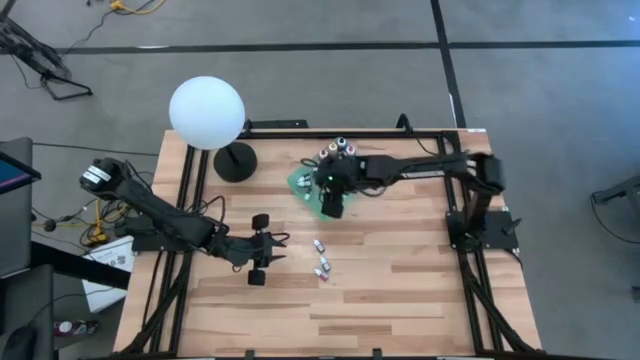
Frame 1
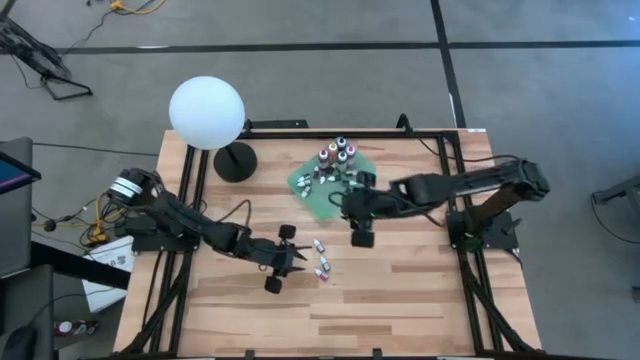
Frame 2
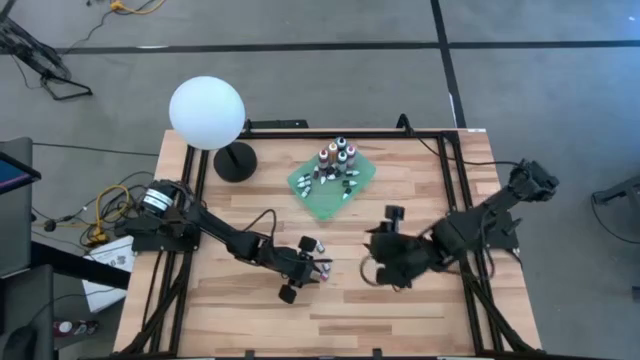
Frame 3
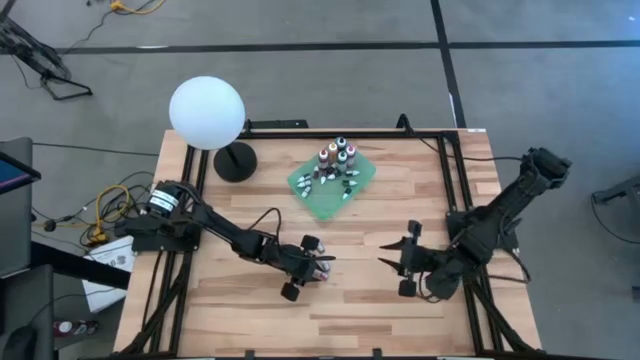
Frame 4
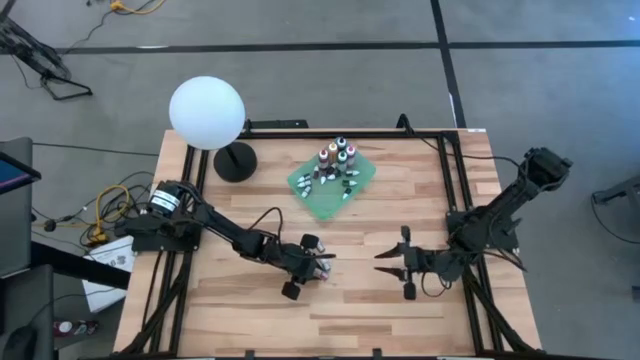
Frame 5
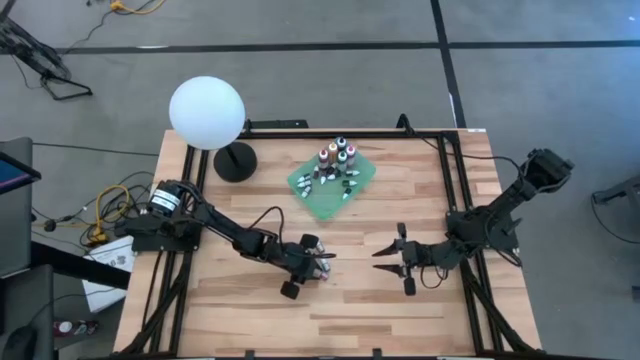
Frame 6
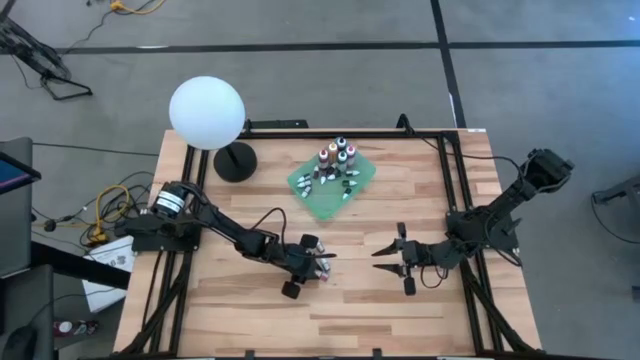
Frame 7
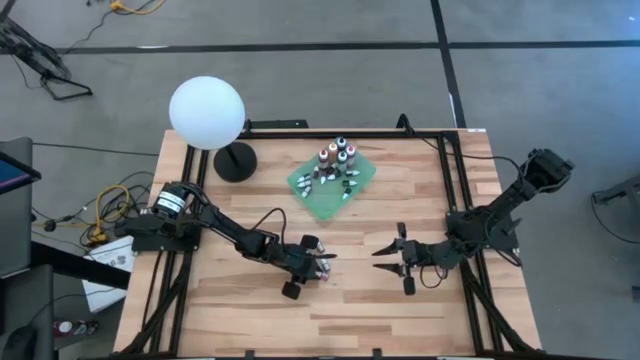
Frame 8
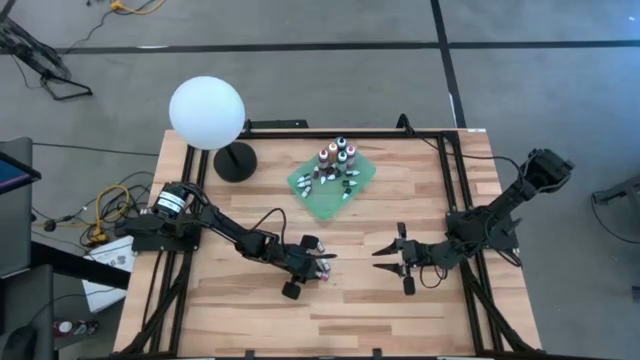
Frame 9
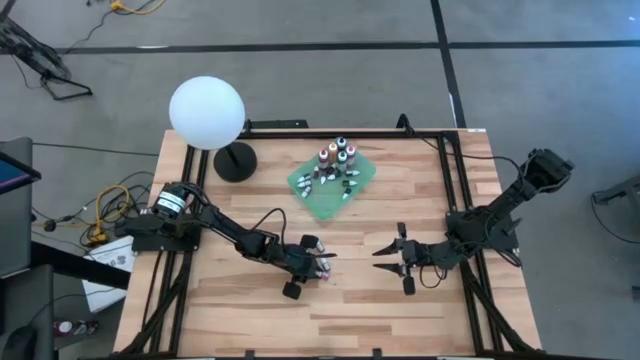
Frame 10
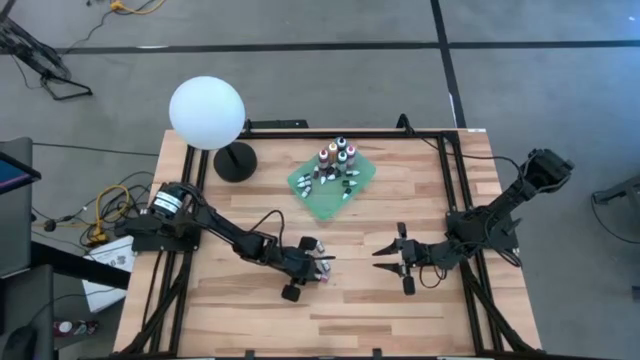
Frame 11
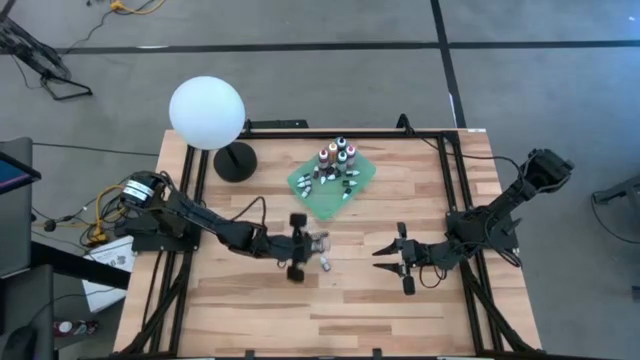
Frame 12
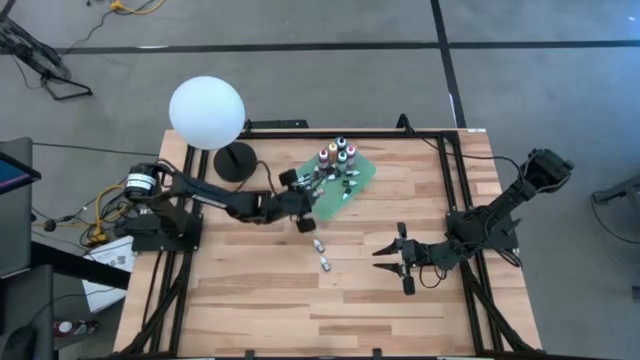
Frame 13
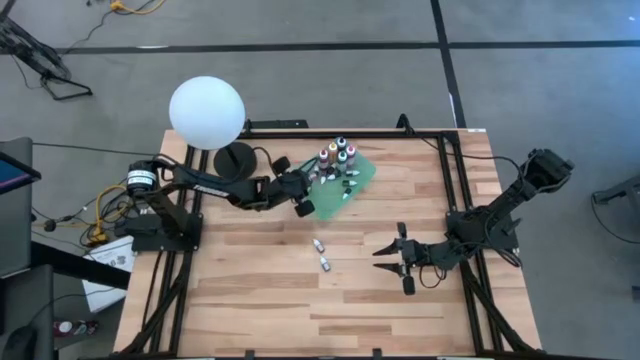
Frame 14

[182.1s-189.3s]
Task: Pick & Place food coloring
Put the pink food coloring bottle into the green bin

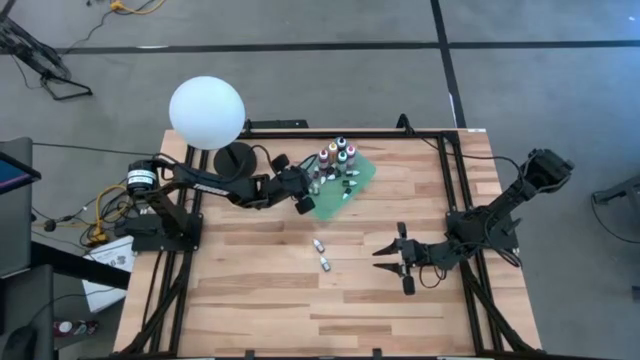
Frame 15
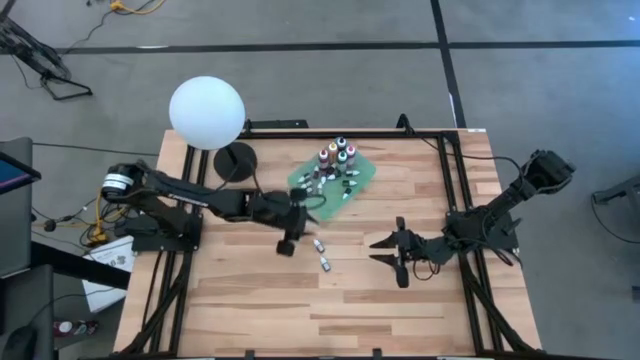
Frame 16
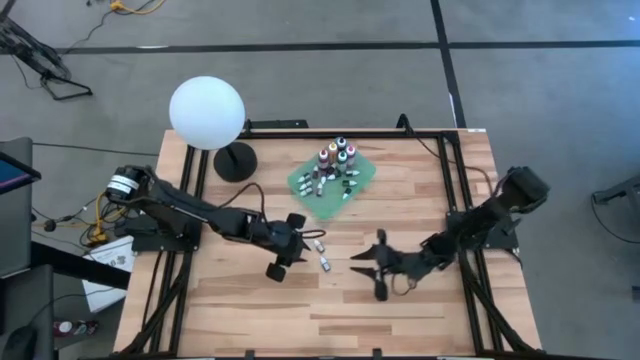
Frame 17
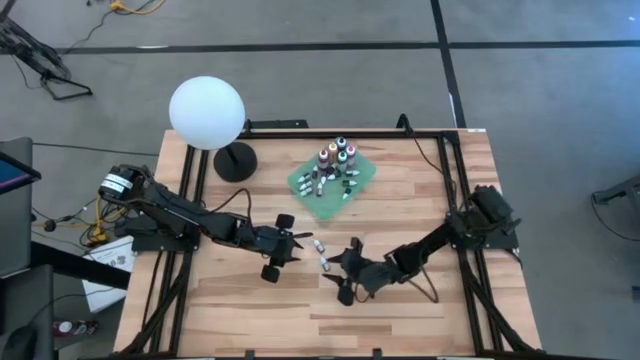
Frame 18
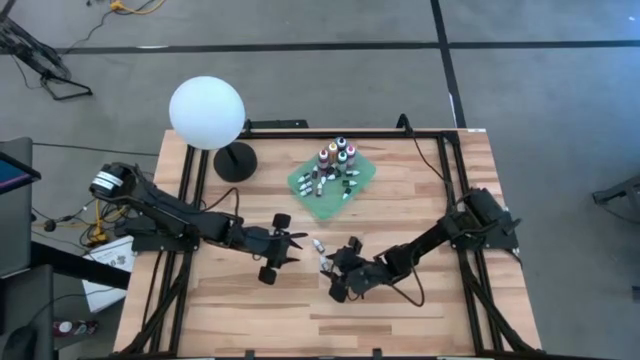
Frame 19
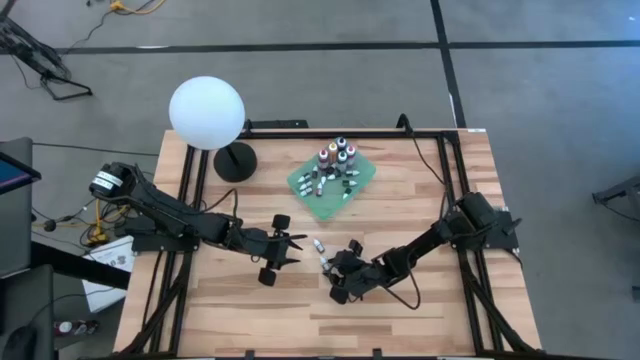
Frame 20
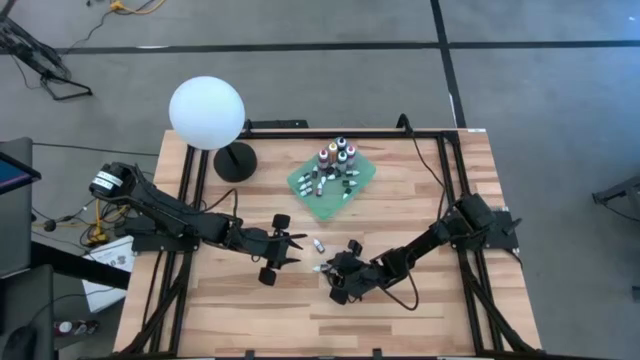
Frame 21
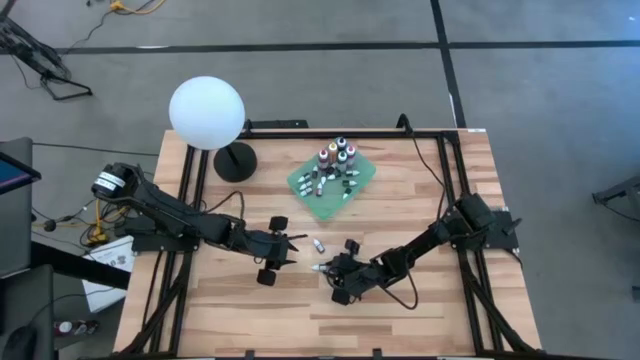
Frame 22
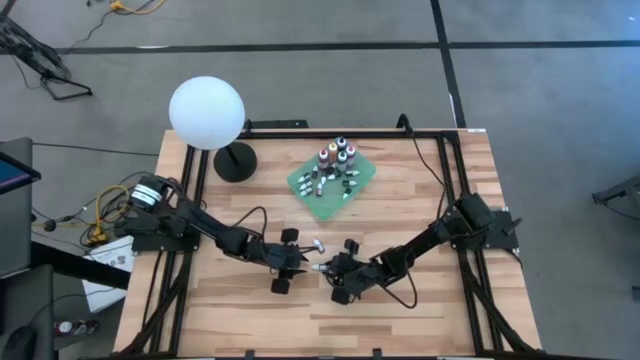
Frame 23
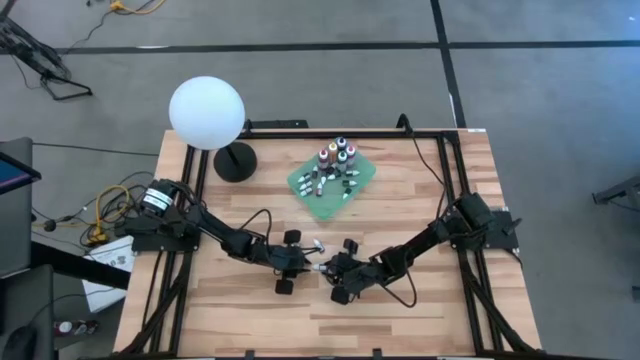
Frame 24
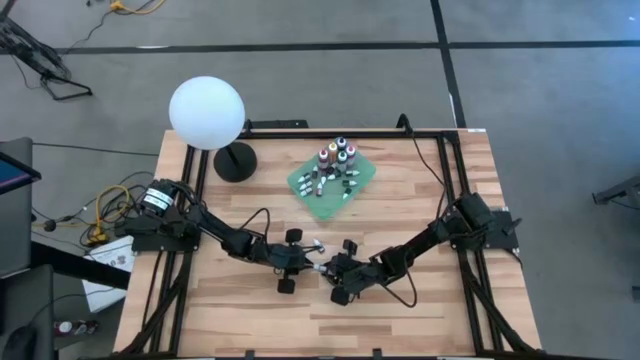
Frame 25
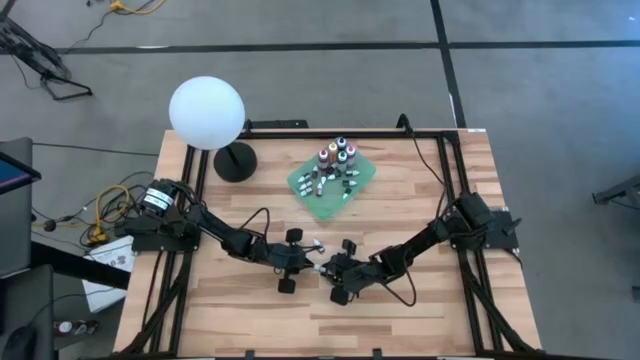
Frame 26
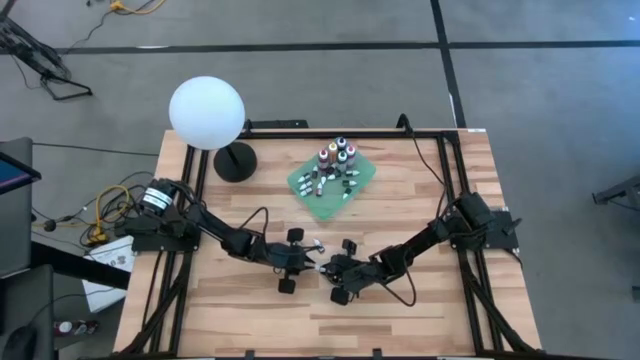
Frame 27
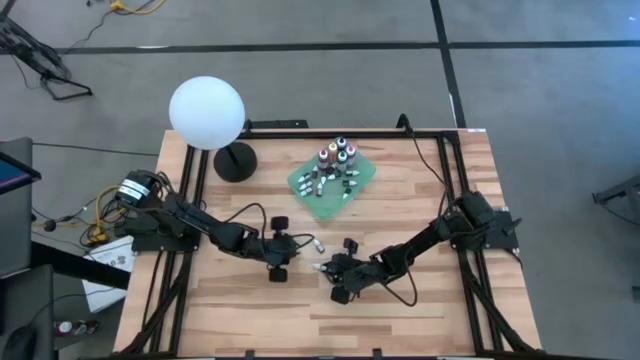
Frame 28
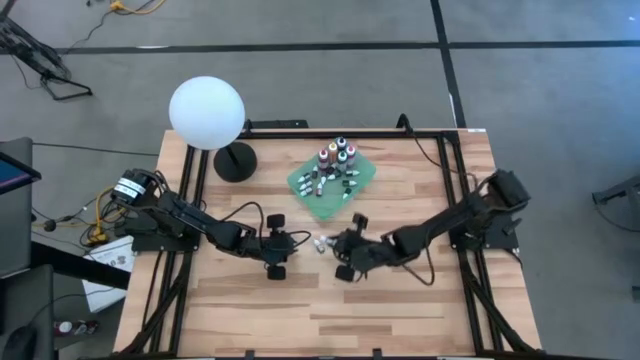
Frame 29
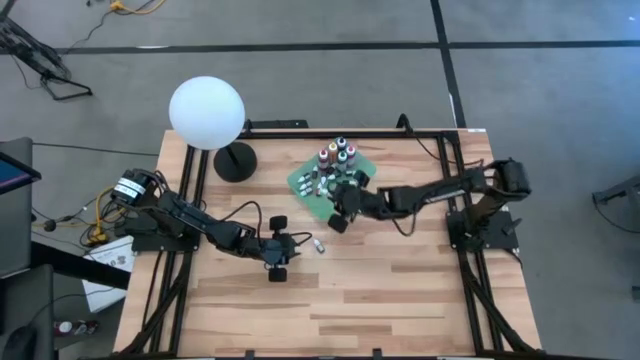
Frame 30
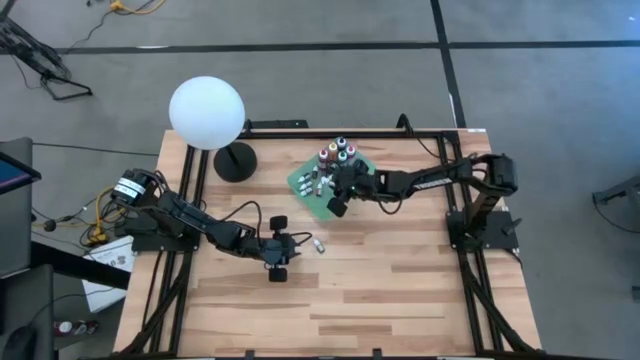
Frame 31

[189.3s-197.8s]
Put the bottom brown food coloring bottle into the green bin

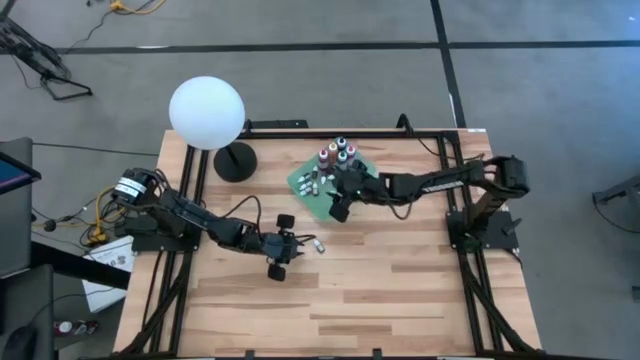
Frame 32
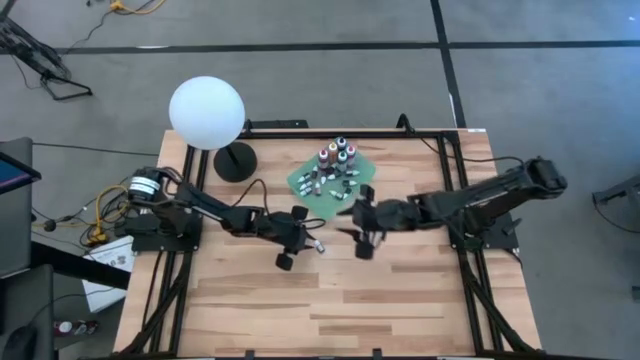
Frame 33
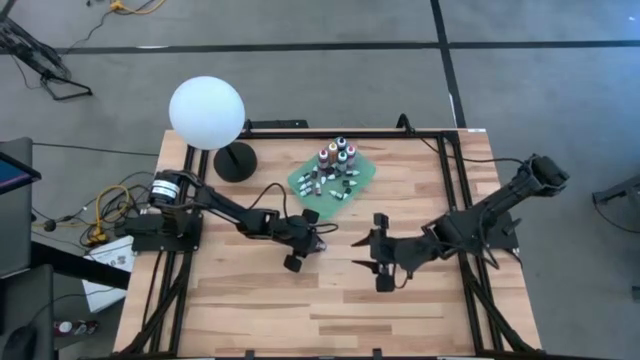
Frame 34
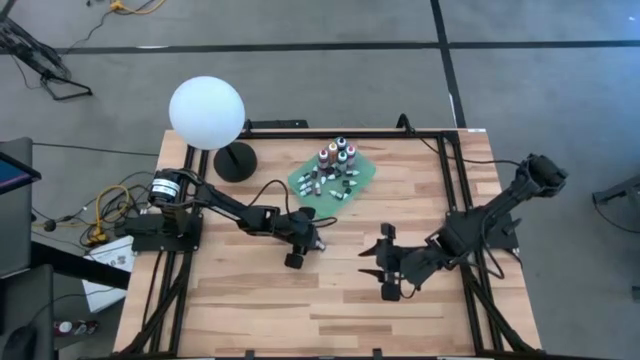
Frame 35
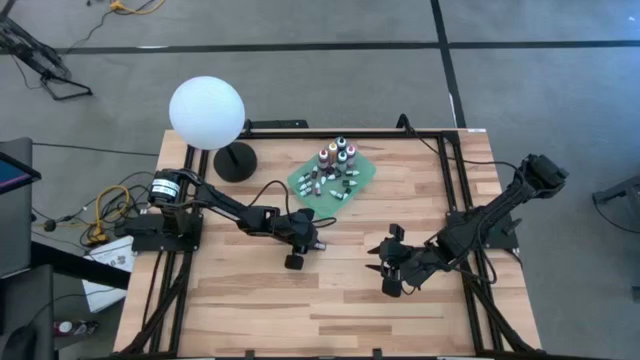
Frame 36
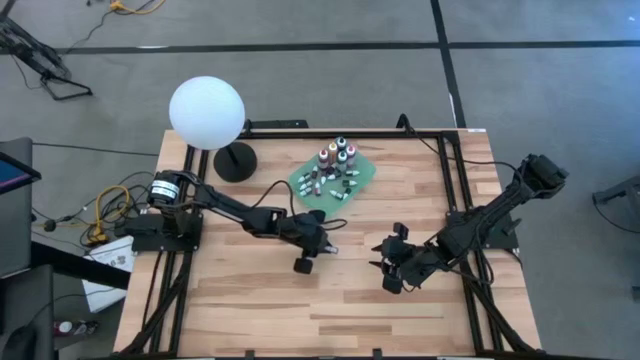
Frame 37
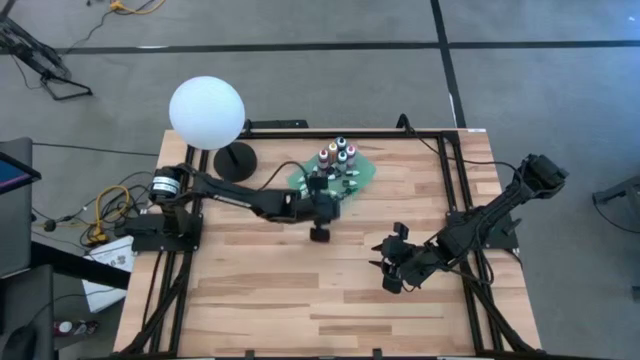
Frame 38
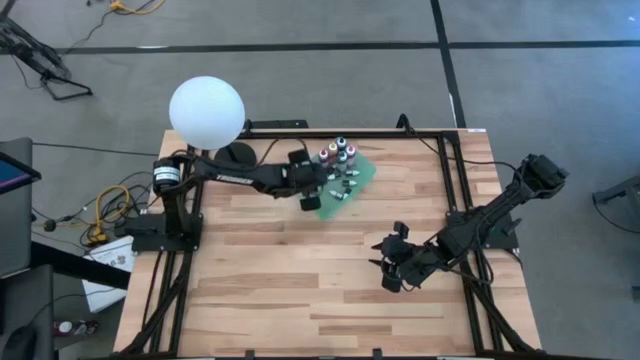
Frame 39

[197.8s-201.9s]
Put the brown food coloring bottle into the green bin
